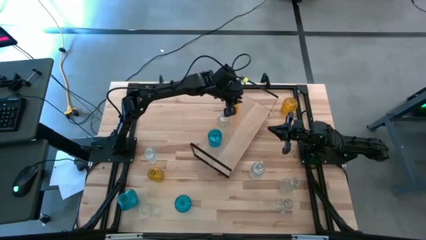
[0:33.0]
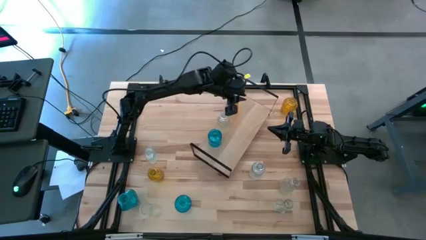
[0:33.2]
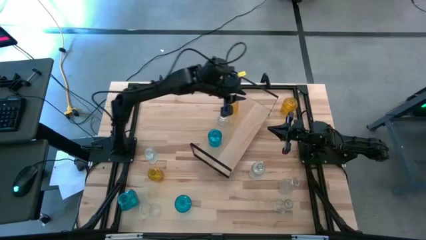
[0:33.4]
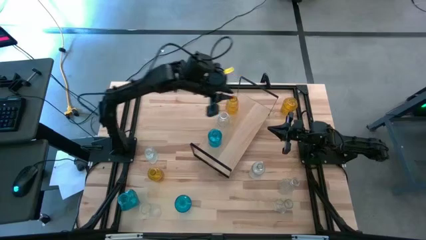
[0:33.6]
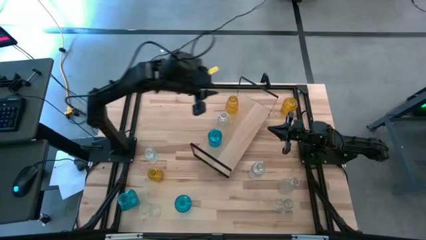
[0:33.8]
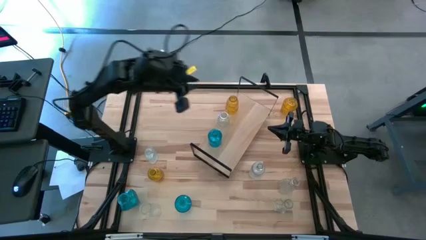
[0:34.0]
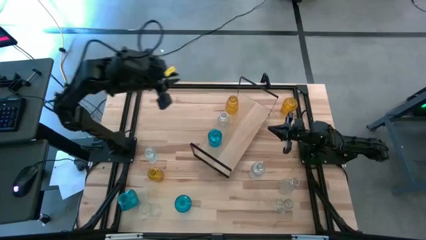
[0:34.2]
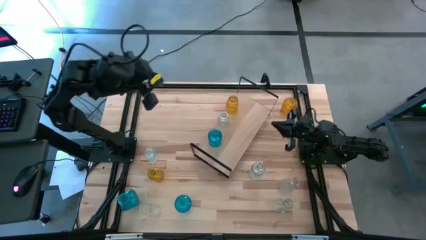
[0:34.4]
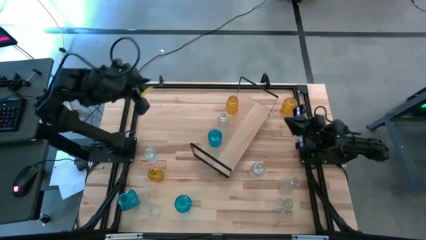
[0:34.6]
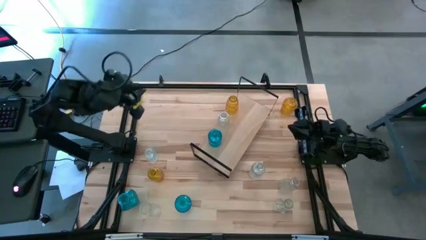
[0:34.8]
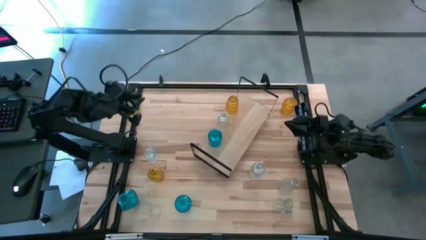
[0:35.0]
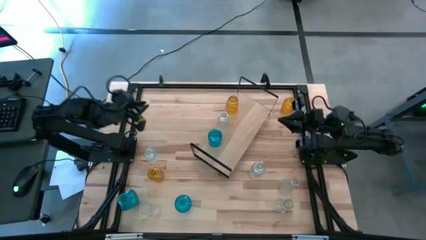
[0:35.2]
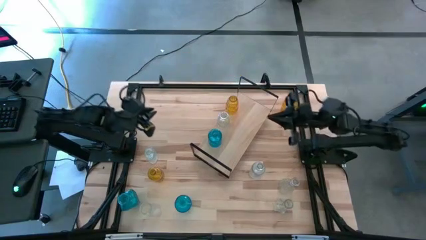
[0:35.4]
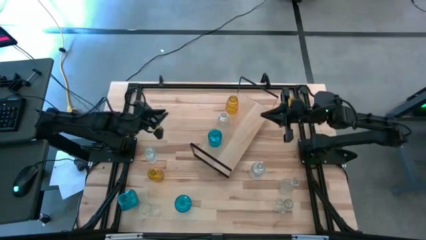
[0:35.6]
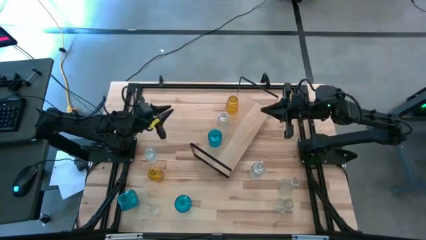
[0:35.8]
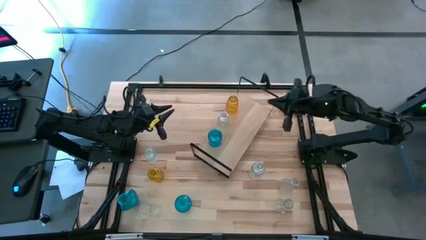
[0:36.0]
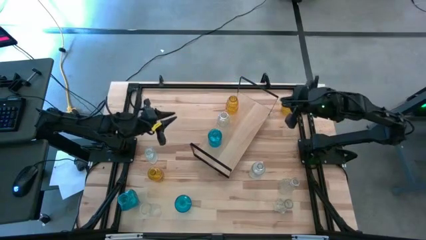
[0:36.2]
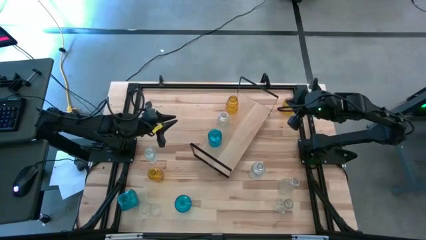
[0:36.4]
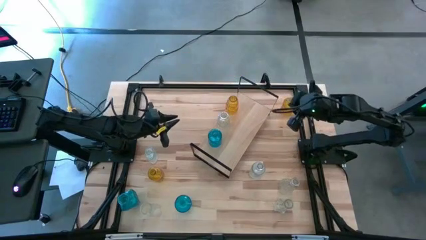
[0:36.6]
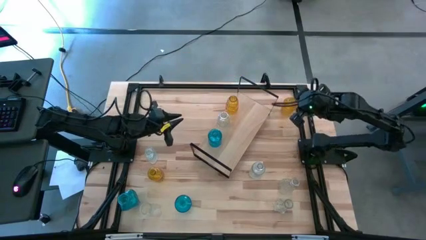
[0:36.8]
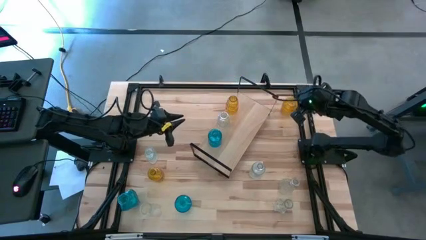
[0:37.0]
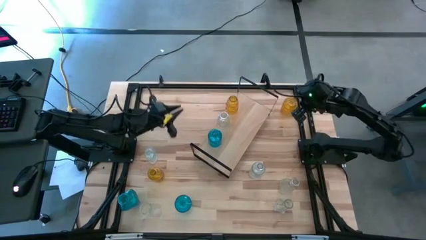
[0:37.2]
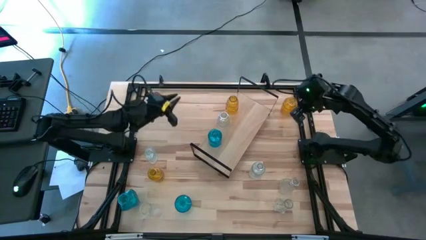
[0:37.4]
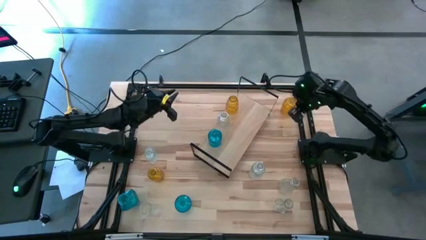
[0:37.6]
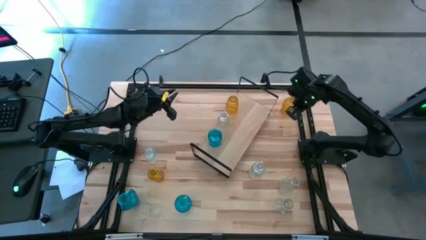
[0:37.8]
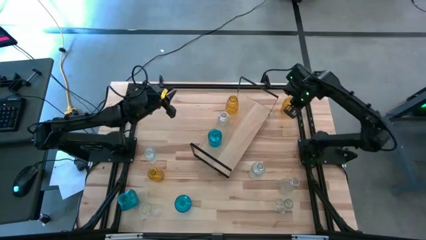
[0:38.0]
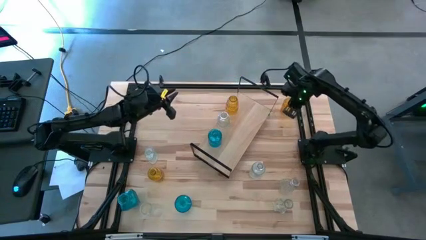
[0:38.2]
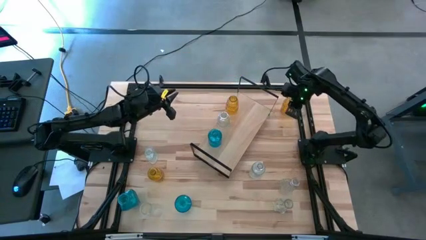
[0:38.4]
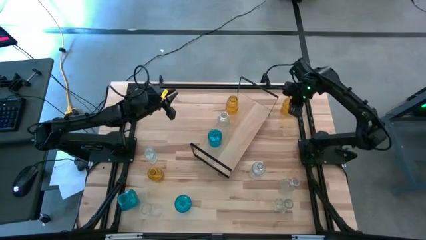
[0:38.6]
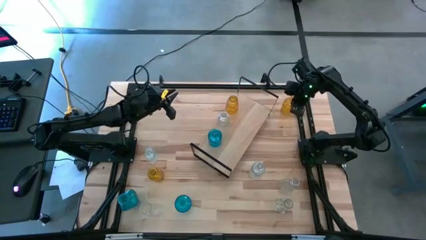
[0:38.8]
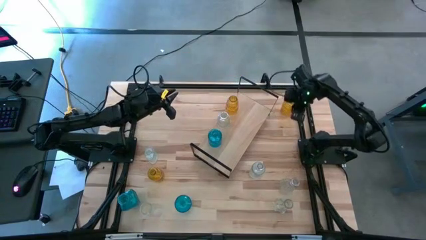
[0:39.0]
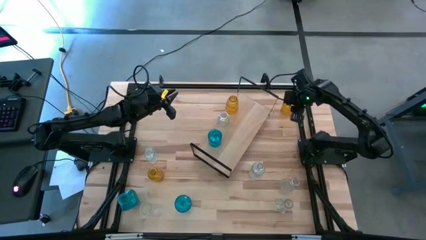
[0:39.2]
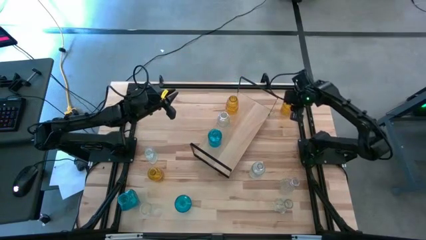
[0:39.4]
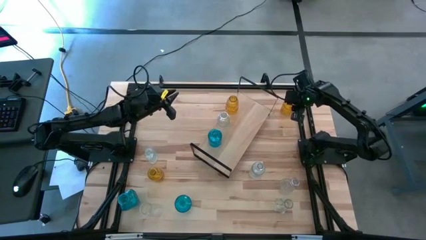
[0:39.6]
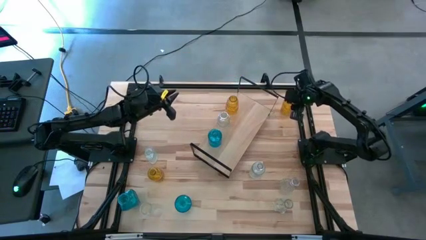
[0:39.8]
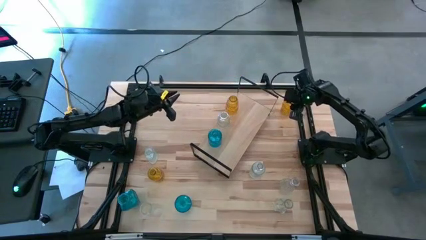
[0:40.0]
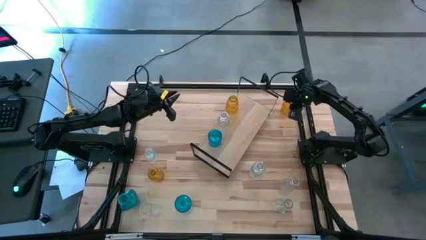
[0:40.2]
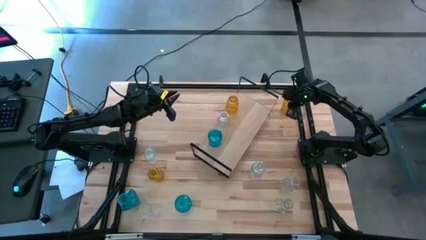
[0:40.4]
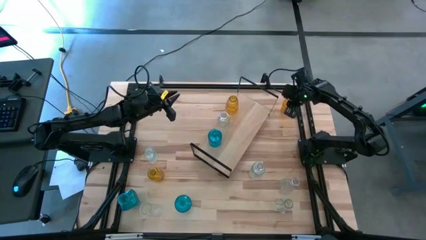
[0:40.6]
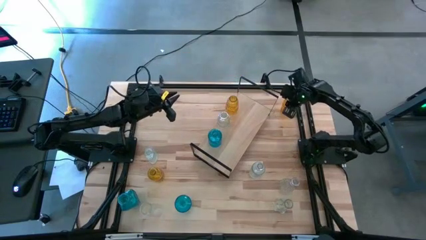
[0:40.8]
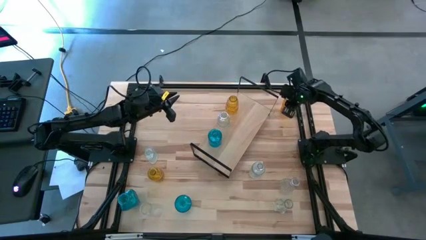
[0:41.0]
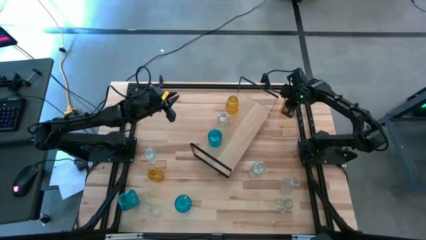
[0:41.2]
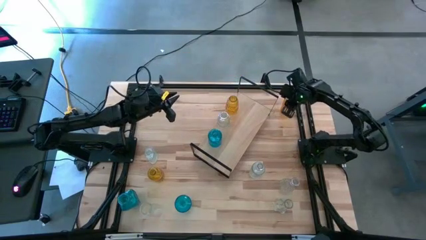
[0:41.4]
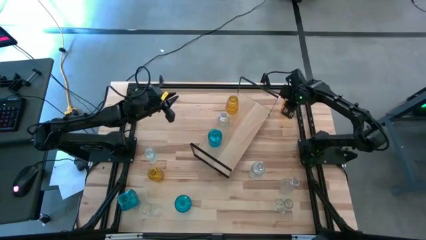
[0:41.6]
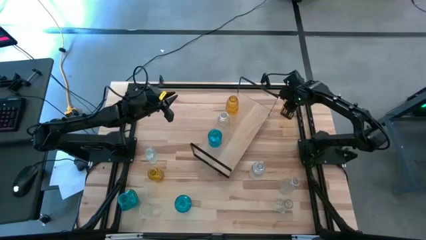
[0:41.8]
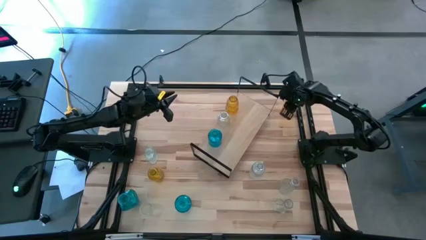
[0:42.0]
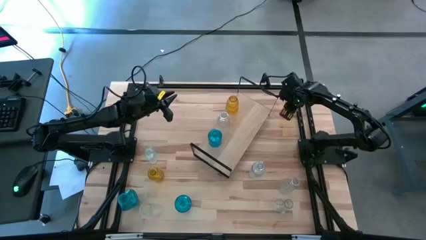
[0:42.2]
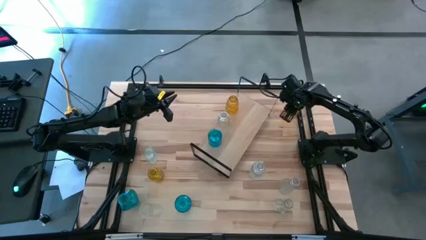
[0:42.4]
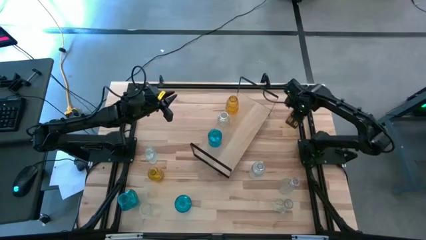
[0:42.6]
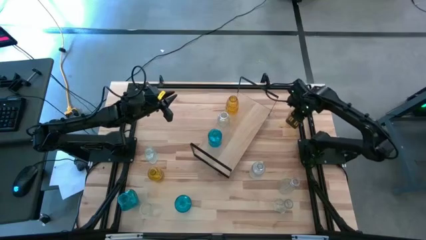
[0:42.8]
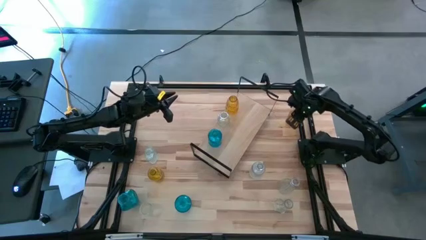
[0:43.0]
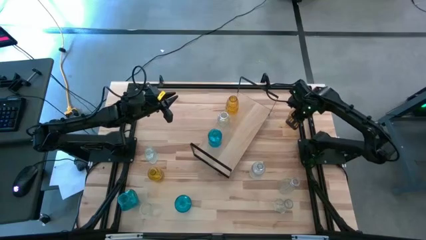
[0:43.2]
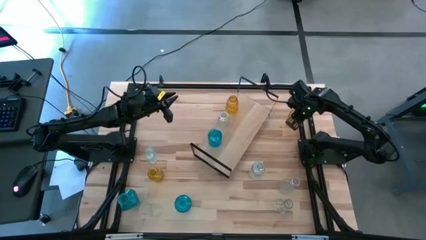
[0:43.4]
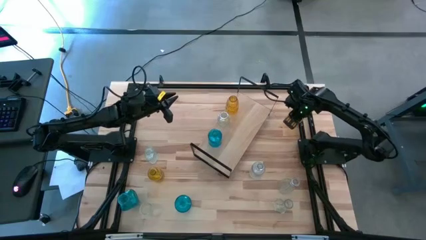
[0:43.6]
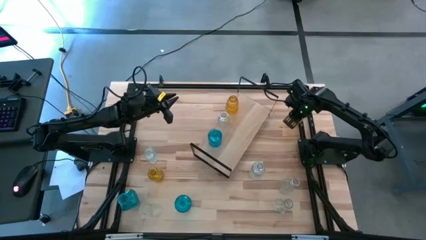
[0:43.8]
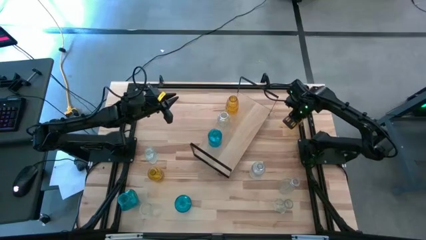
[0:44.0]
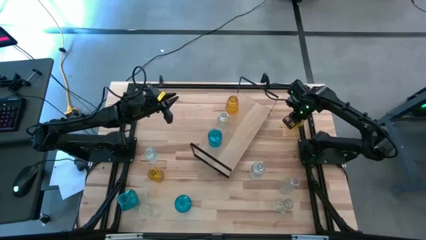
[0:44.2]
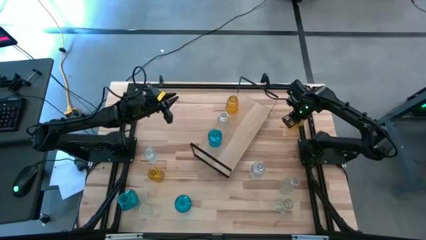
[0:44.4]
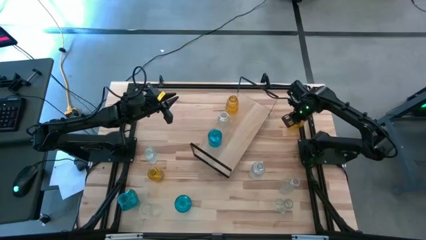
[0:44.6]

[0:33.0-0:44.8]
Task: sort vases onto shelf
Put the top yellow vase on the shelf and align with the other yellow vase
